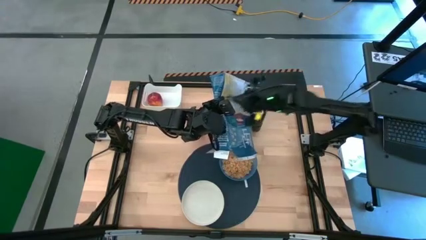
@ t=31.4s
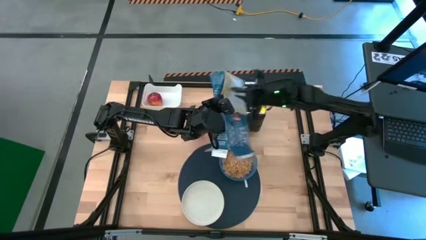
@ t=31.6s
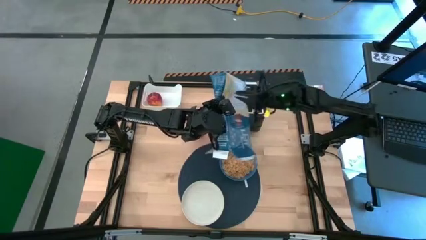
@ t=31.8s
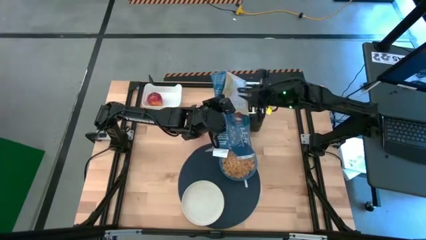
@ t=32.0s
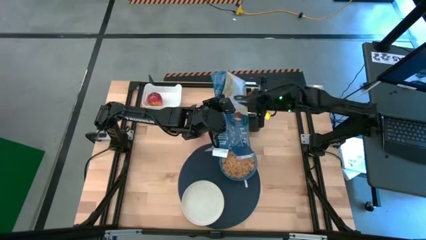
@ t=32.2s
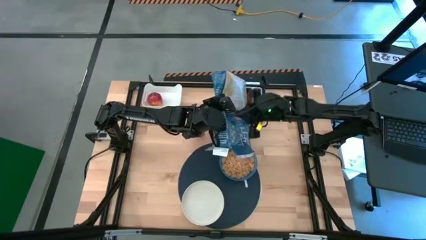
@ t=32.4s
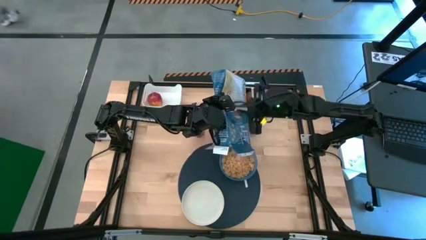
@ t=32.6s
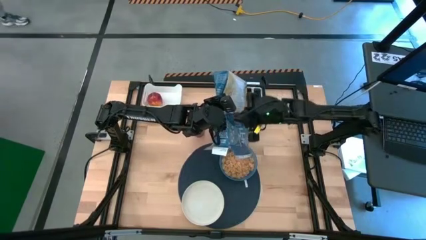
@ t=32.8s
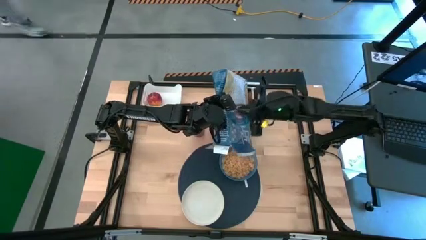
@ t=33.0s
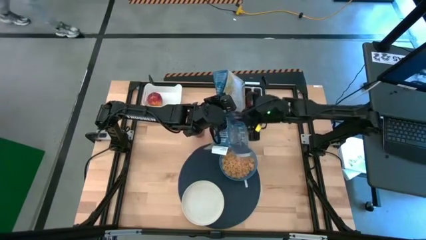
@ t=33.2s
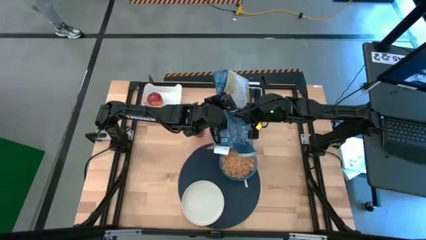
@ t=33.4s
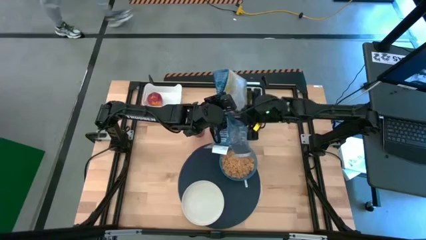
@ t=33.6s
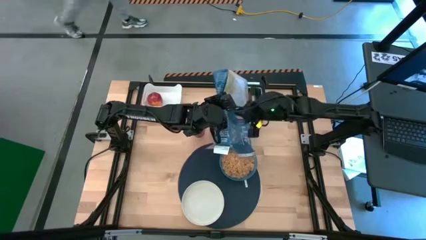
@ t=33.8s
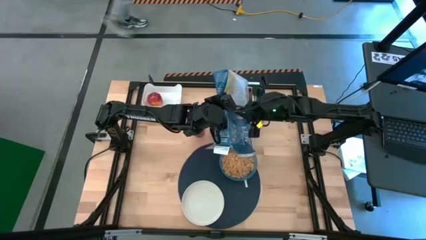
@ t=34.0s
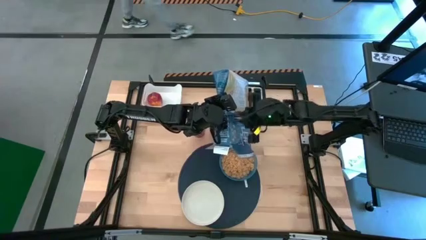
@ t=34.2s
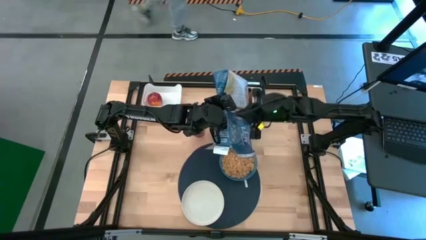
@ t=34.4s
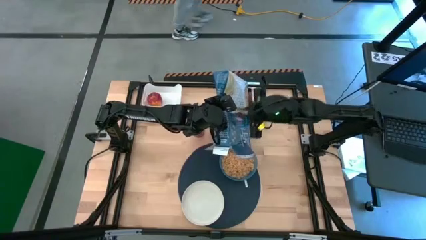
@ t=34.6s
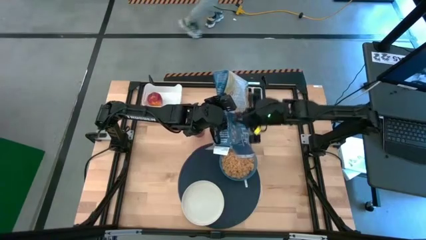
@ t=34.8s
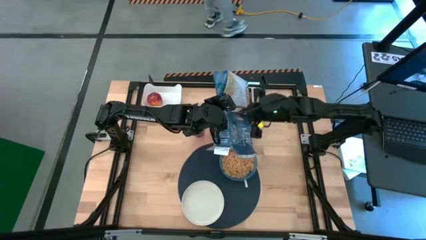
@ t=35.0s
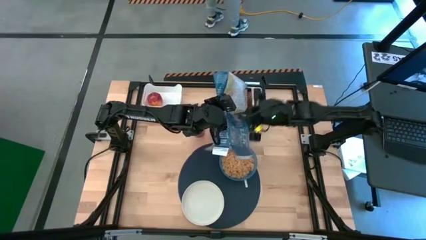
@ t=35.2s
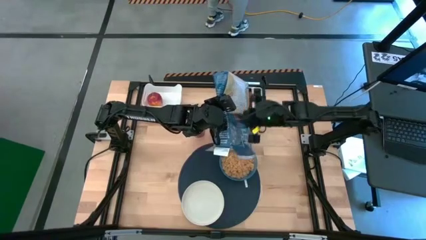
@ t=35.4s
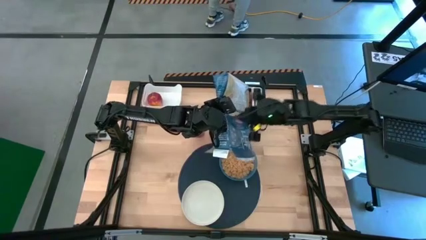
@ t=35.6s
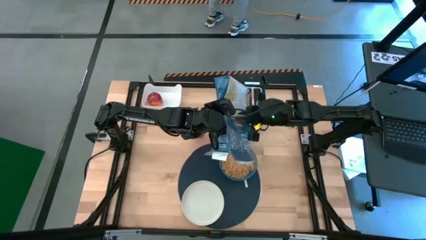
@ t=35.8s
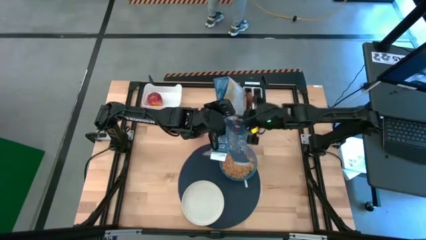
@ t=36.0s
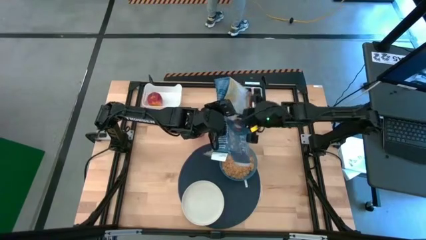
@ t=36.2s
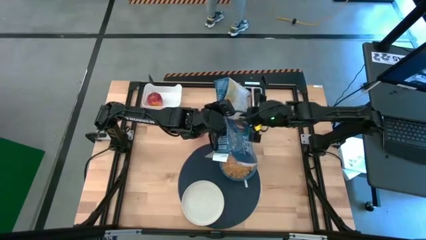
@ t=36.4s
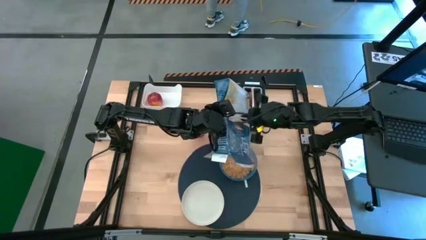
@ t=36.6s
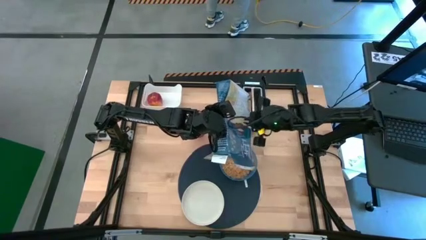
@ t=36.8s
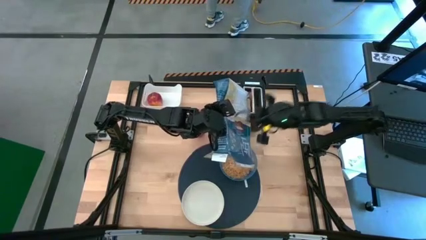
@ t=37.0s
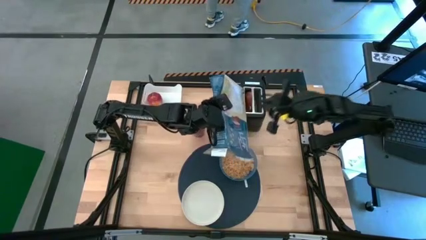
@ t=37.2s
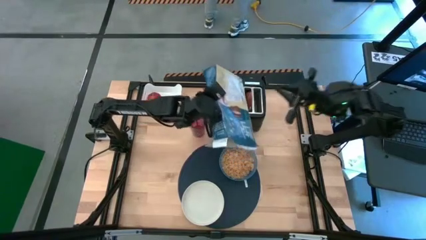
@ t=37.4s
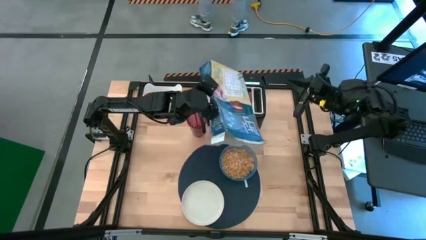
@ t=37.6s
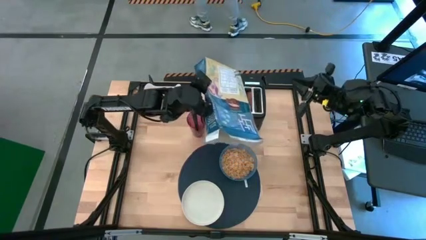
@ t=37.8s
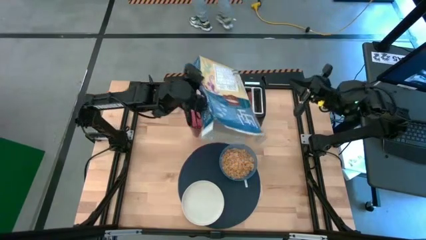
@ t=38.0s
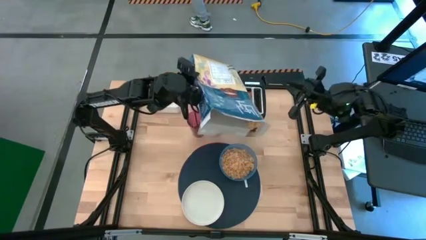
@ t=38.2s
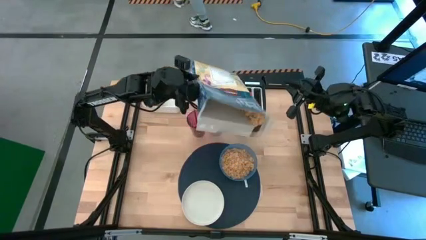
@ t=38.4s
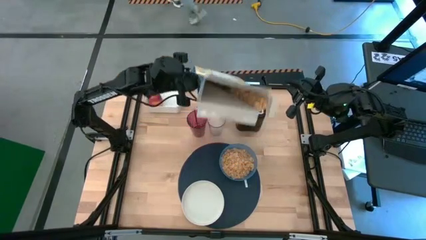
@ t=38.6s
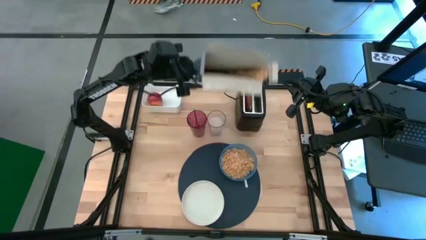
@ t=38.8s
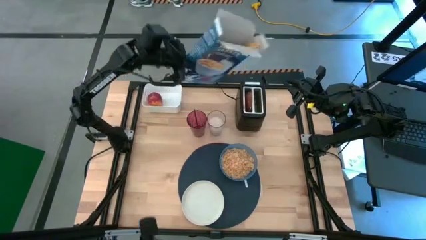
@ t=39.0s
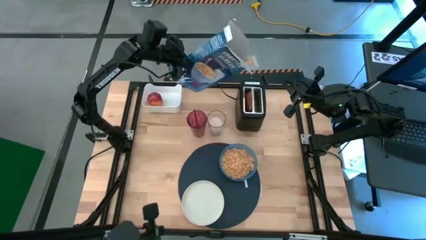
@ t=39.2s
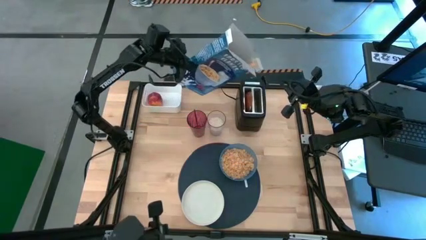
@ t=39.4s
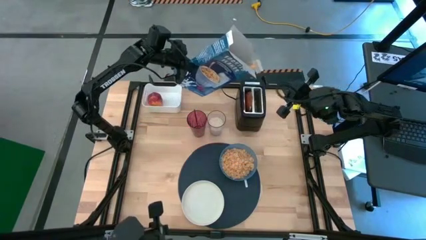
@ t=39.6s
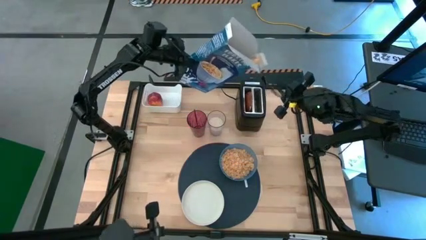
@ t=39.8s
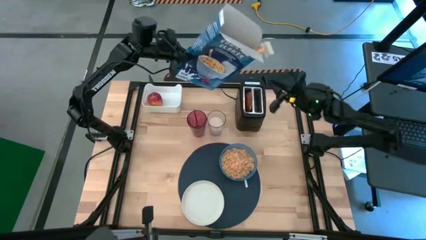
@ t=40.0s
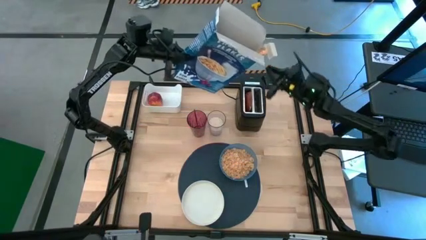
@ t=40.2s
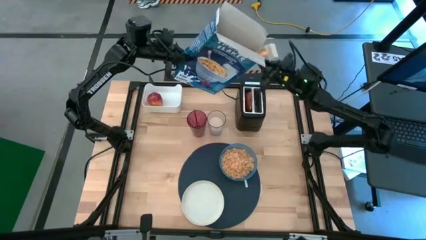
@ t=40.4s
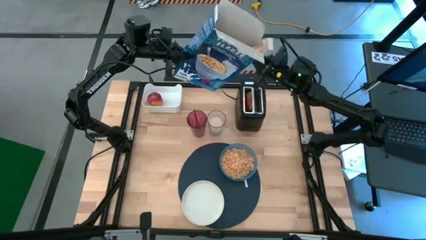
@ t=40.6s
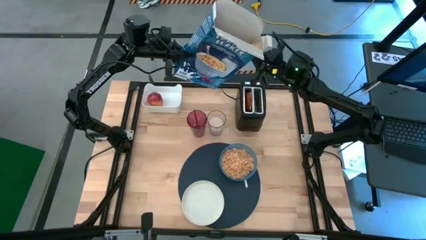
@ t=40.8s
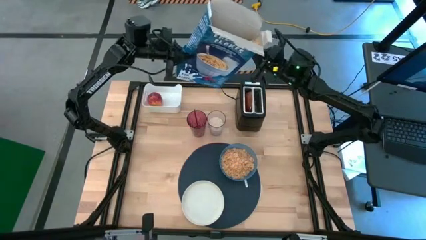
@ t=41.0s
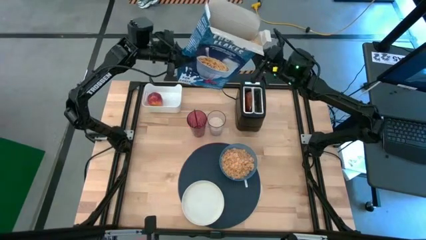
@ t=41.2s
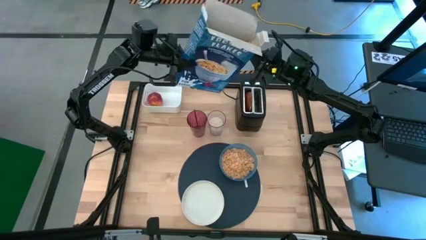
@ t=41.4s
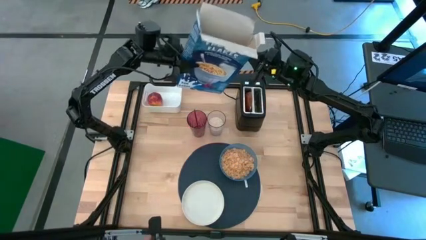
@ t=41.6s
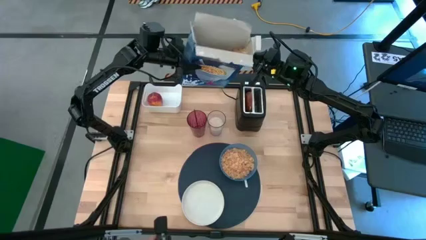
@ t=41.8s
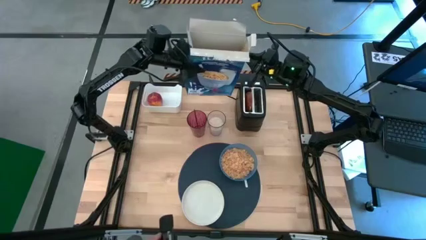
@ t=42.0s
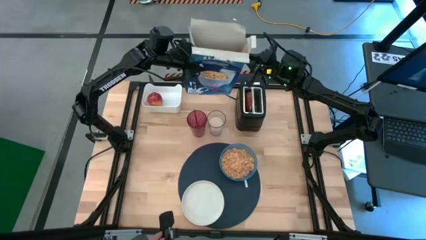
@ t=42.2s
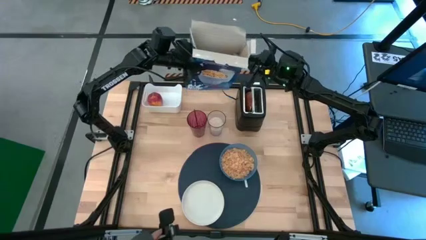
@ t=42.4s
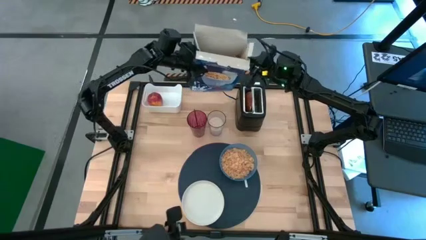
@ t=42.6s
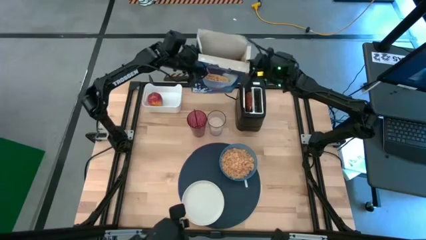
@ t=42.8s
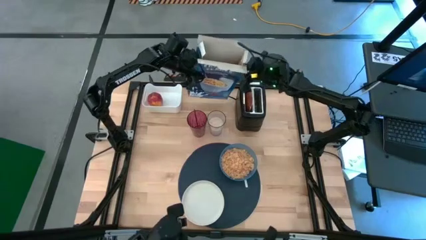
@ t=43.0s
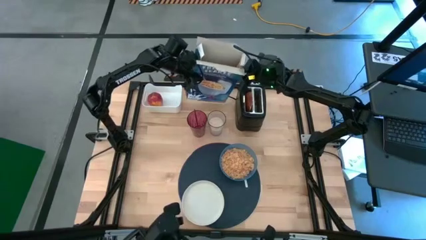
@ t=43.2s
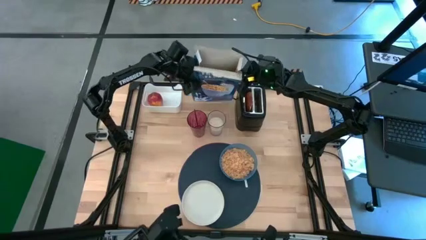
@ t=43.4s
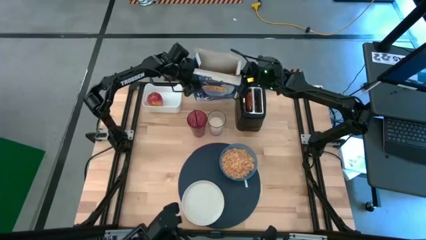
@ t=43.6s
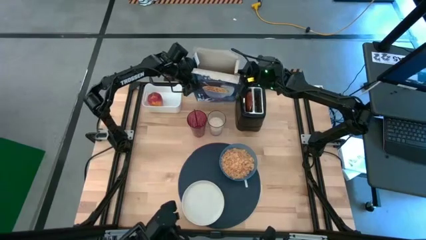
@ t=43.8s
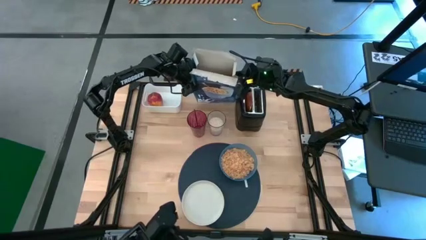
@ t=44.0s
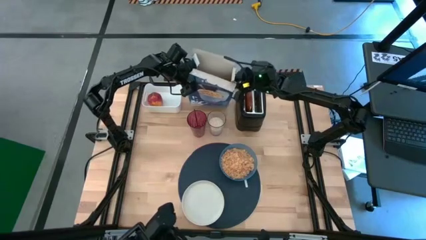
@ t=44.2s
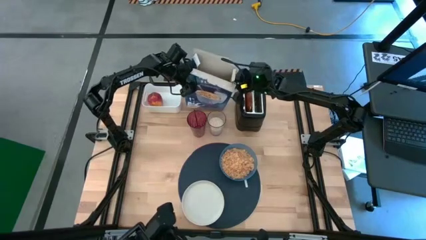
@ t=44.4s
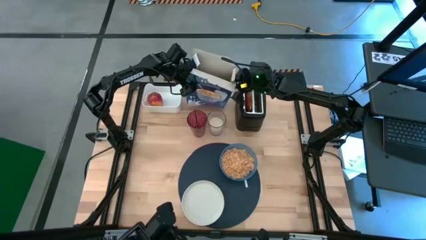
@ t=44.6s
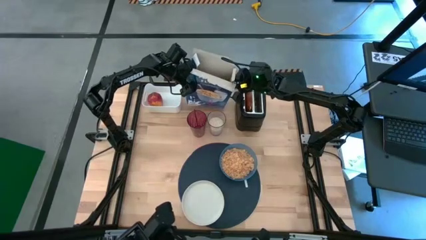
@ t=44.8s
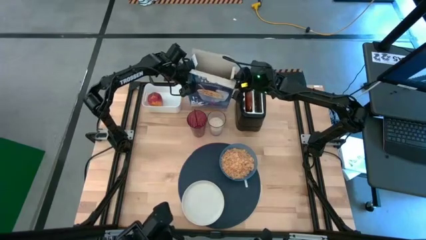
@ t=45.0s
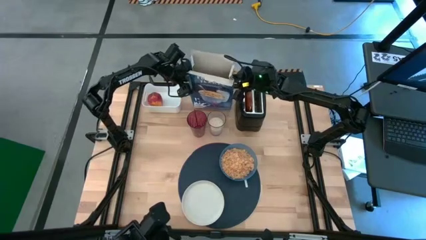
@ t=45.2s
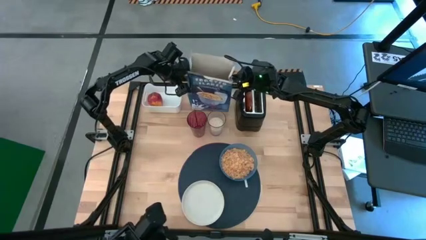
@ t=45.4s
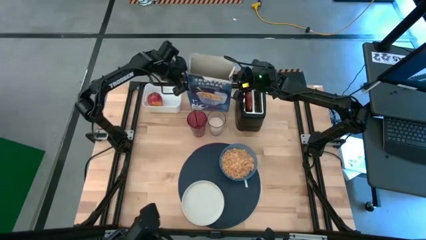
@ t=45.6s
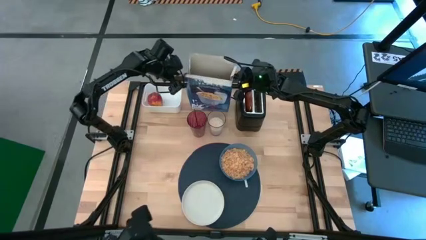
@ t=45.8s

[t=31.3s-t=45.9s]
Task: Arrange a breakfast setting
Pour the cereal from the cereal box into the blue bowl

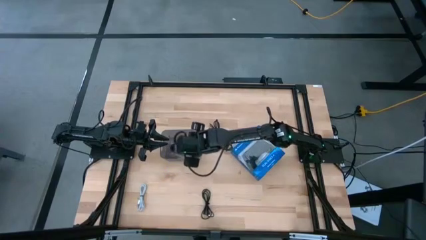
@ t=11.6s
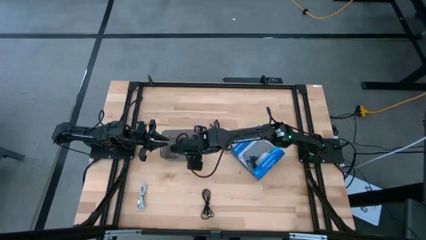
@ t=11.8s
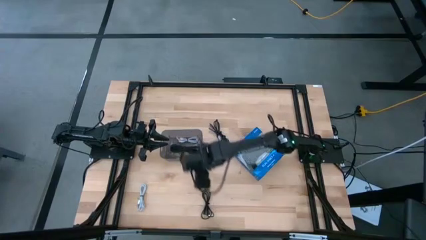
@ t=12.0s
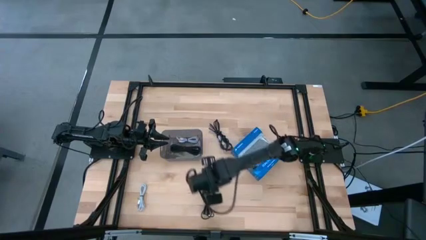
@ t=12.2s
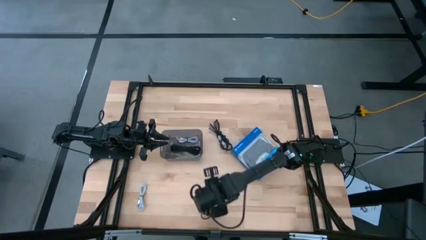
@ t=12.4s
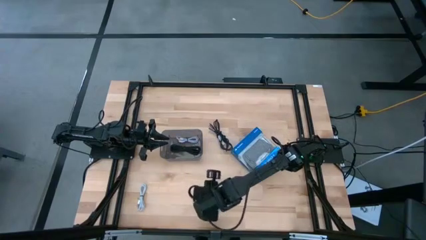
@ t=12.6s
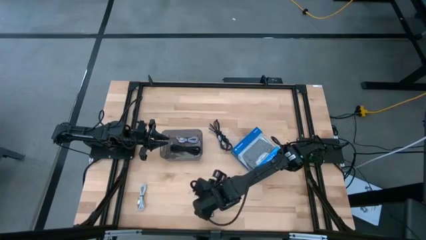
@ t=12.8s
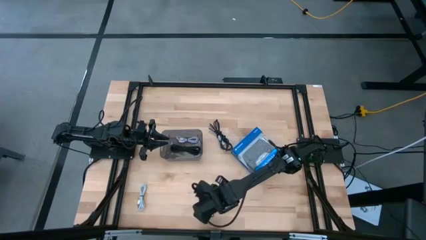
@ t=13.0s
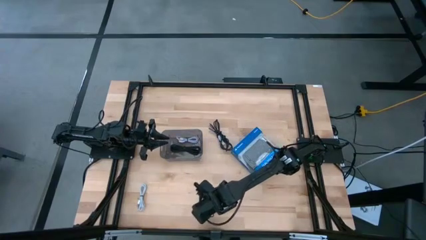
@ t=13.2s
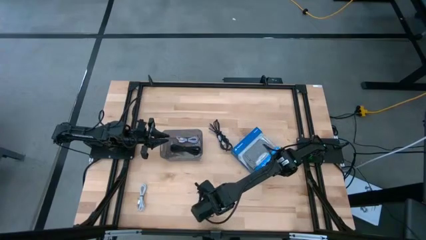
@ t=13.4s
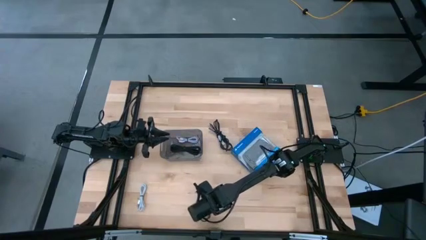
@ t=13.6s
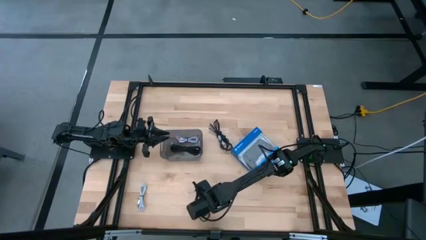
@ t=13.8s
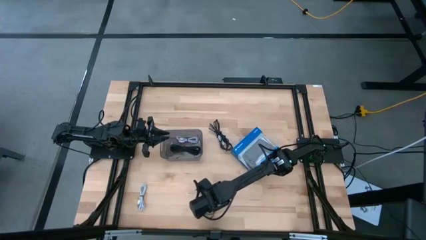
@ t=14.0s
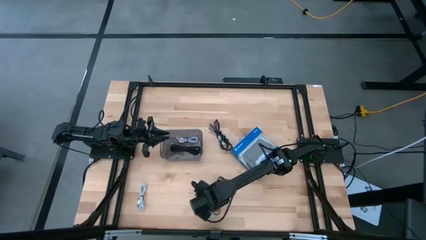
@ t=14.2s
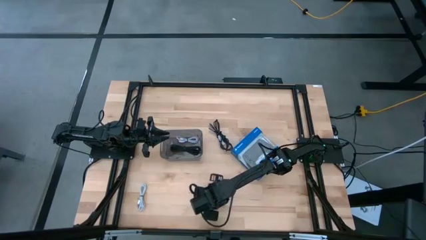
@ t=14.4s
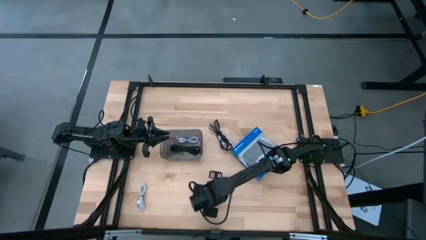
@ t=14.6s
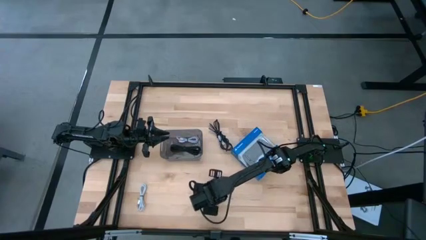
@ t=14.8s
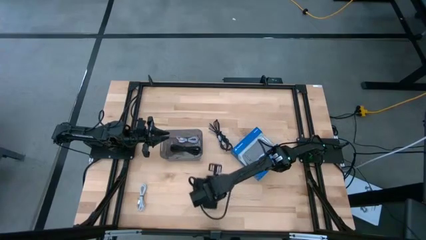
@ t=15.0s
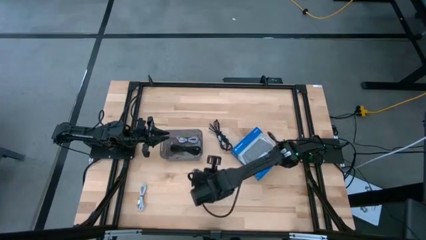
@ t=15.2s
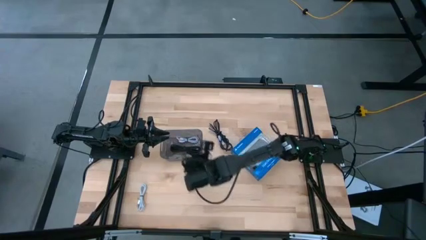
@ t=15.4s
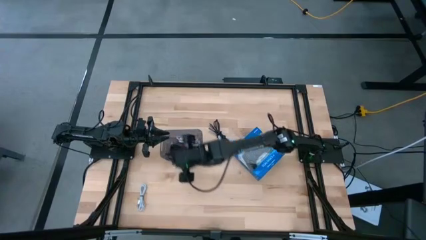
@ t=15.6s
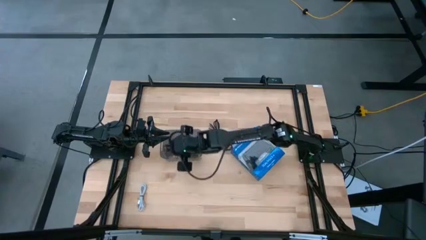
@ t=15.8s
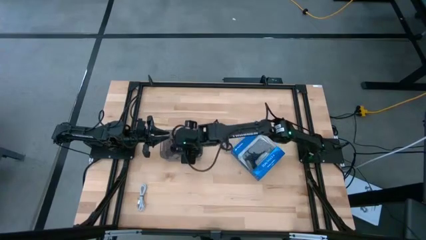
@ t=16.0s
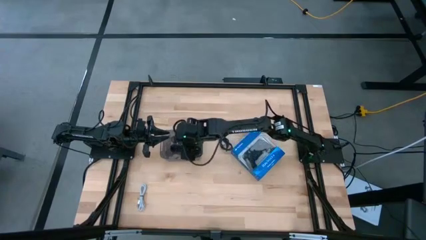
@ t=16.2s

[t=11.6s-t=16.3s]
Task: Pick and place USB-C Cables
Put the bottom black charger cable into the black bin
